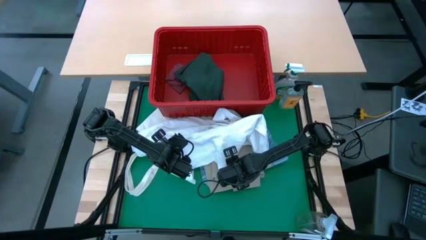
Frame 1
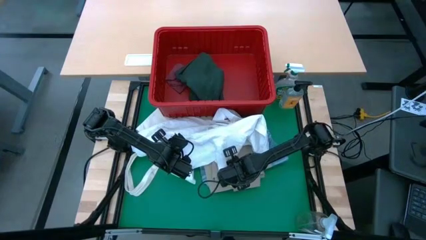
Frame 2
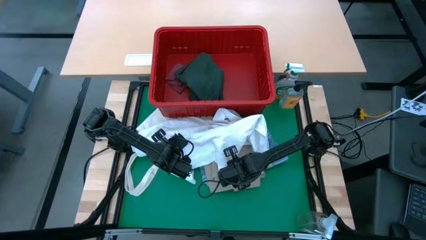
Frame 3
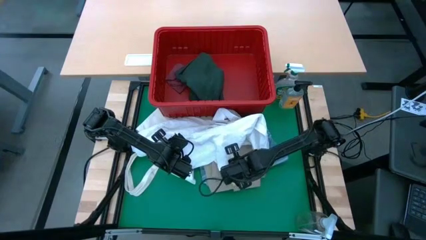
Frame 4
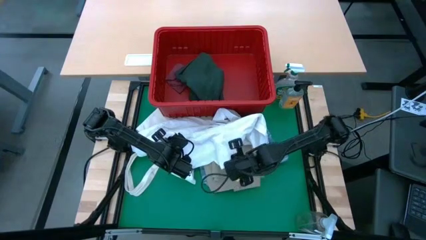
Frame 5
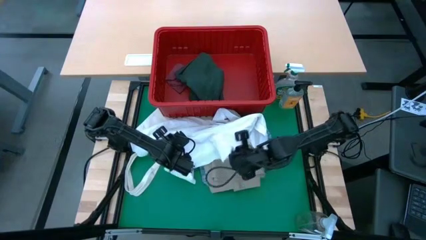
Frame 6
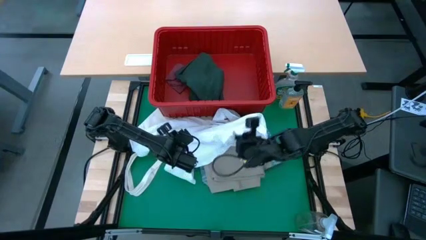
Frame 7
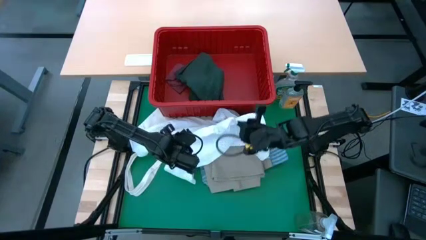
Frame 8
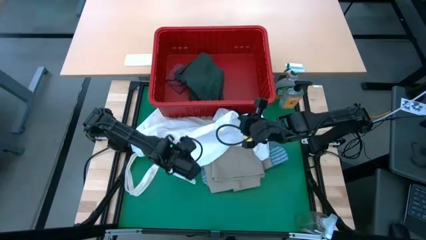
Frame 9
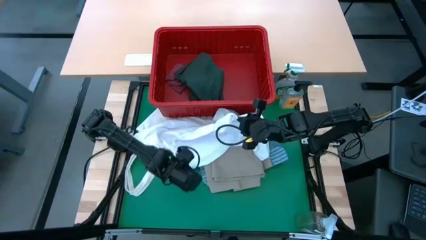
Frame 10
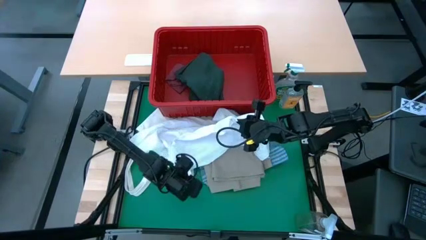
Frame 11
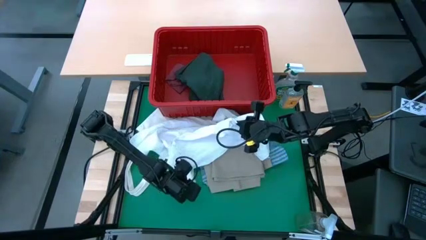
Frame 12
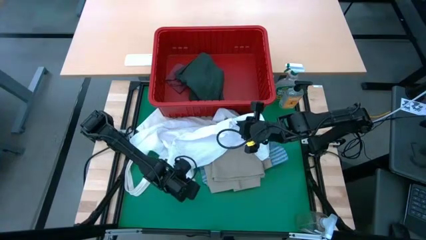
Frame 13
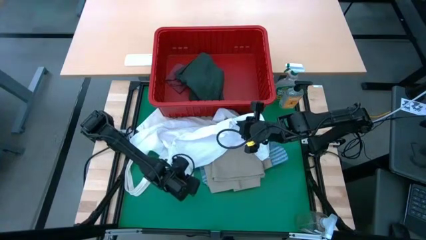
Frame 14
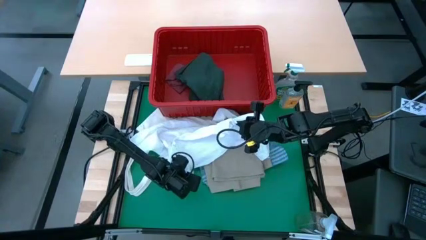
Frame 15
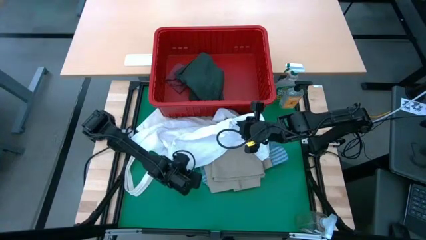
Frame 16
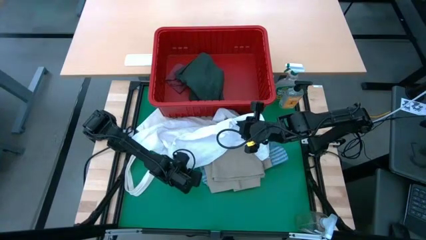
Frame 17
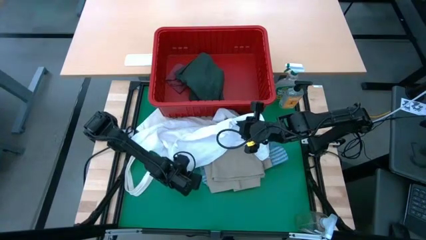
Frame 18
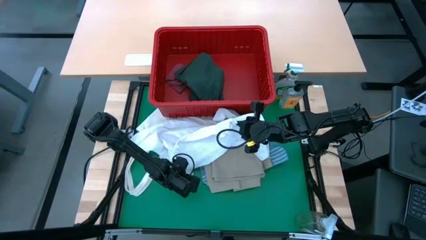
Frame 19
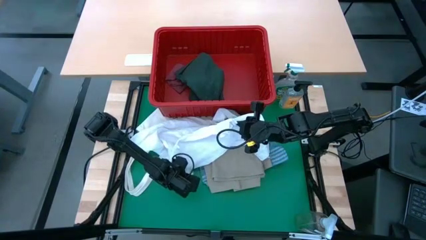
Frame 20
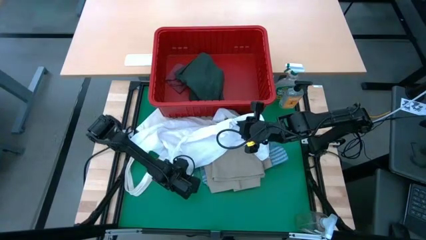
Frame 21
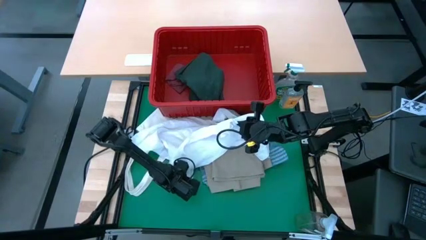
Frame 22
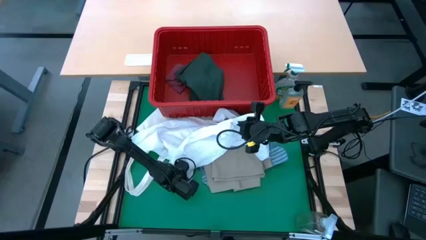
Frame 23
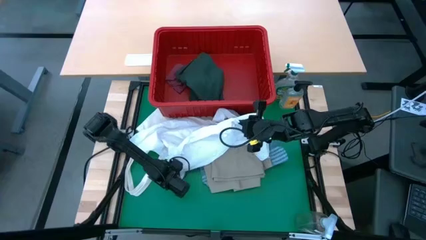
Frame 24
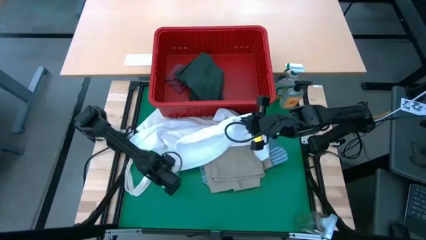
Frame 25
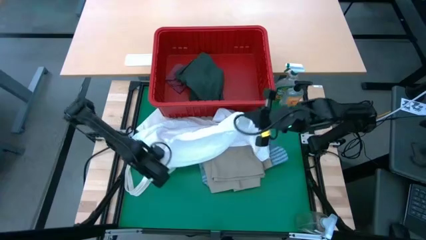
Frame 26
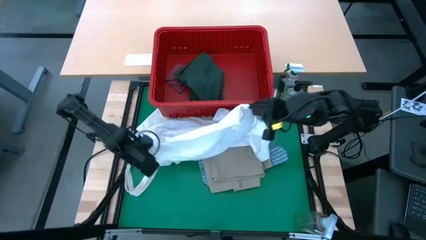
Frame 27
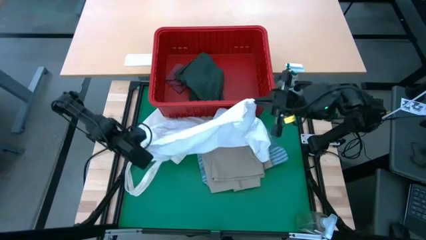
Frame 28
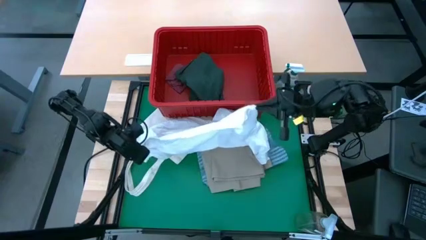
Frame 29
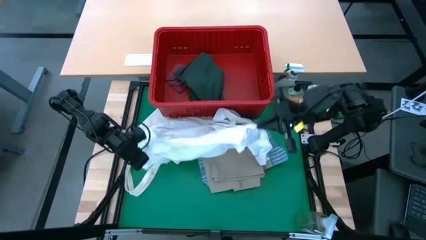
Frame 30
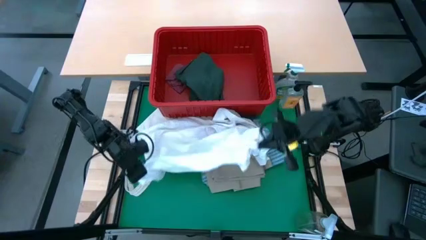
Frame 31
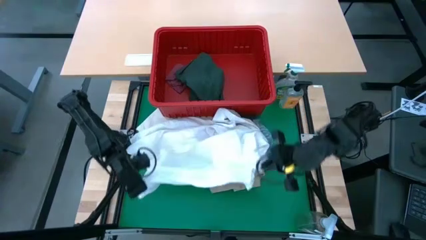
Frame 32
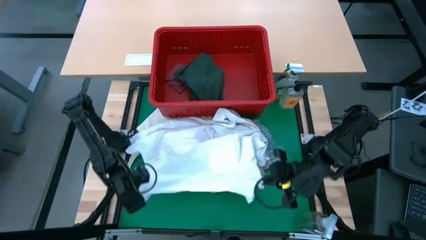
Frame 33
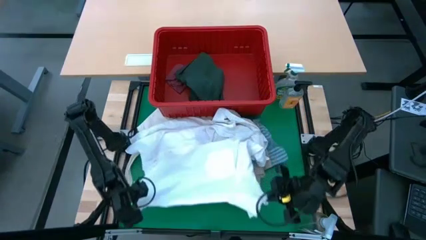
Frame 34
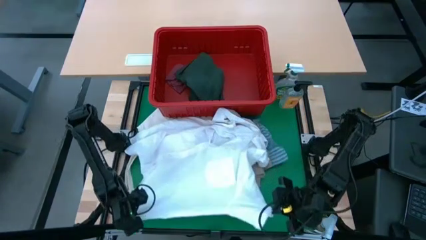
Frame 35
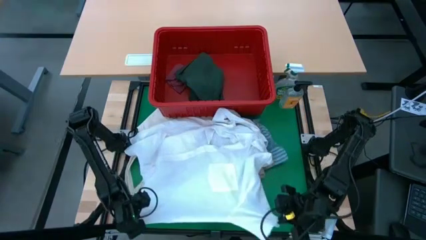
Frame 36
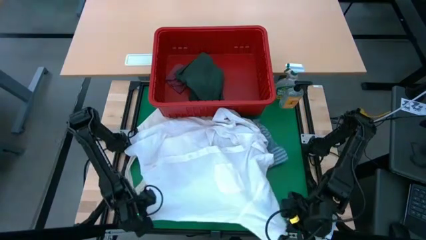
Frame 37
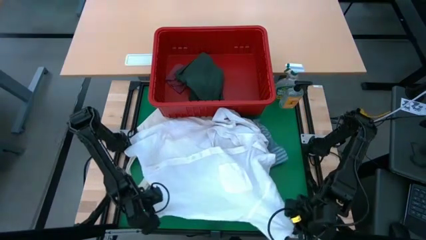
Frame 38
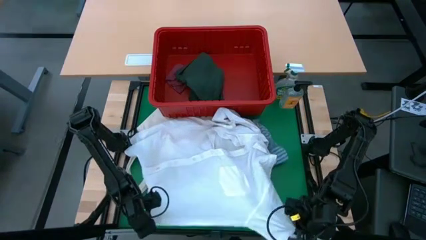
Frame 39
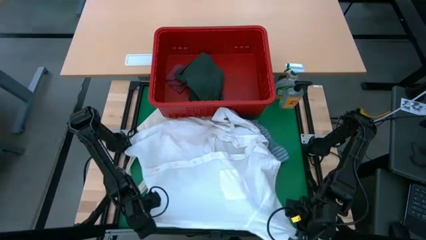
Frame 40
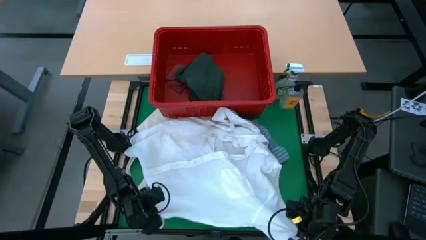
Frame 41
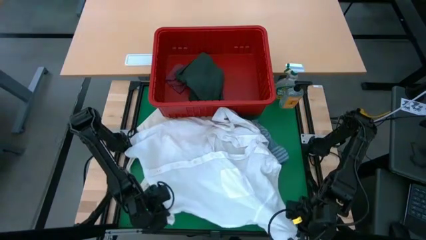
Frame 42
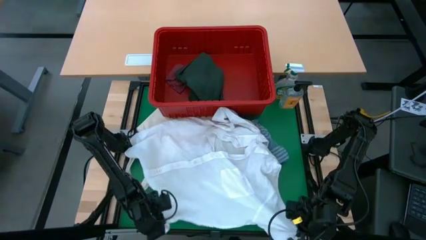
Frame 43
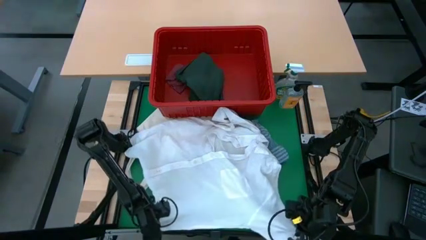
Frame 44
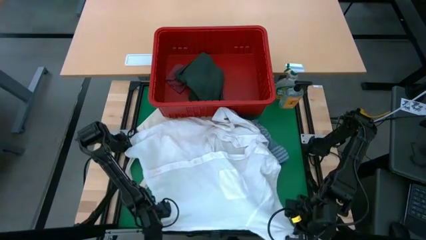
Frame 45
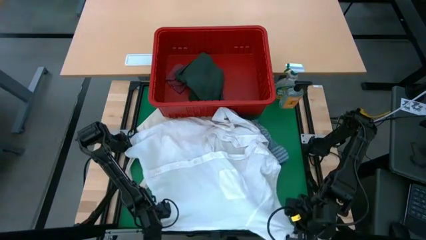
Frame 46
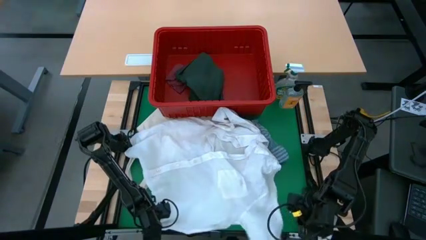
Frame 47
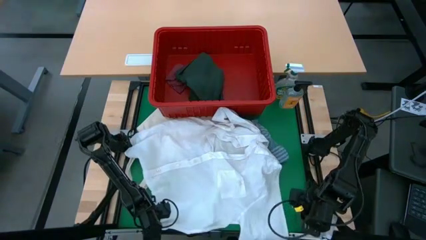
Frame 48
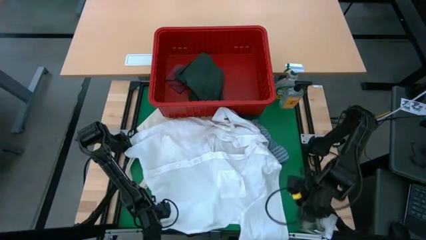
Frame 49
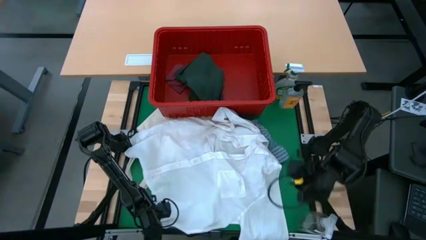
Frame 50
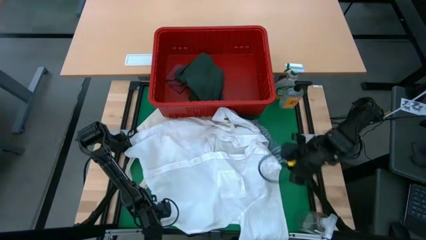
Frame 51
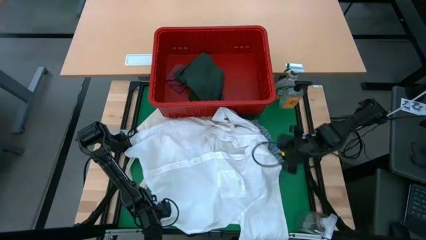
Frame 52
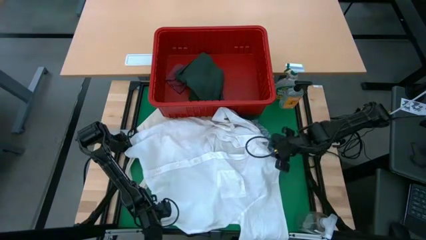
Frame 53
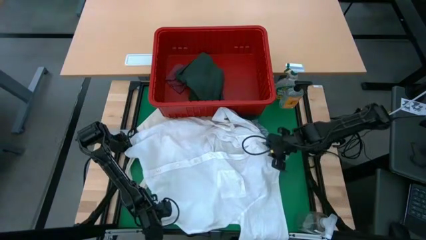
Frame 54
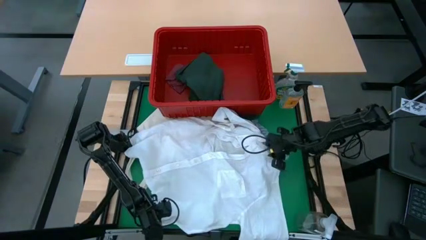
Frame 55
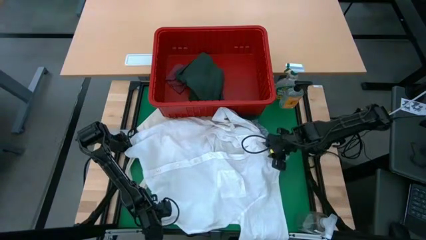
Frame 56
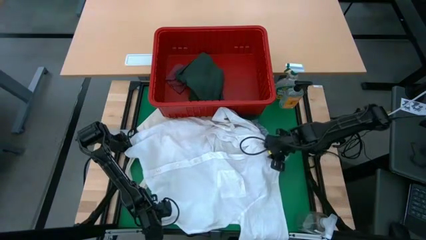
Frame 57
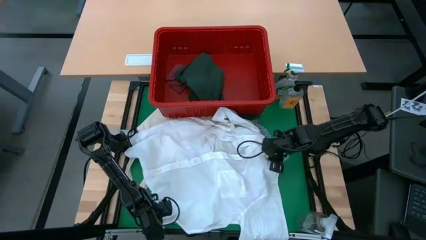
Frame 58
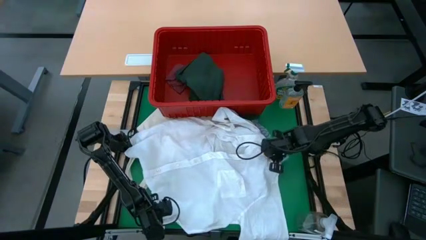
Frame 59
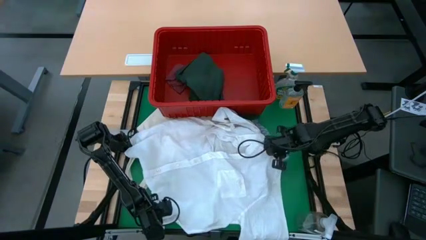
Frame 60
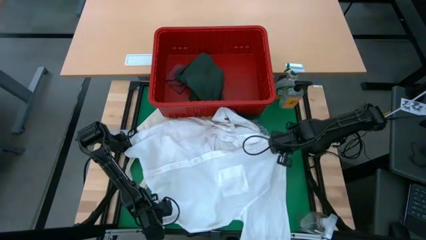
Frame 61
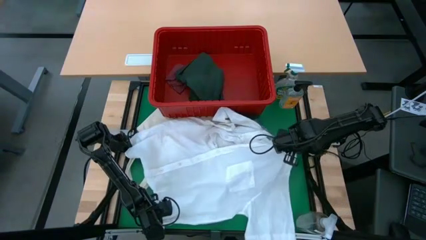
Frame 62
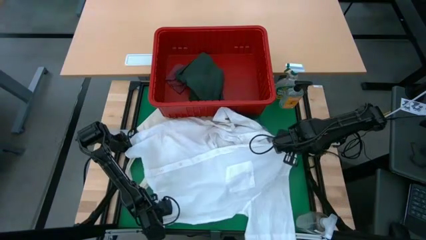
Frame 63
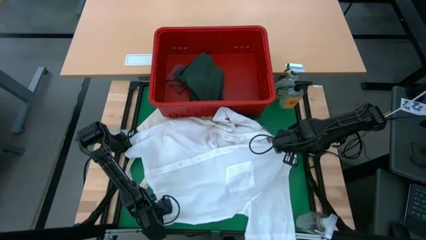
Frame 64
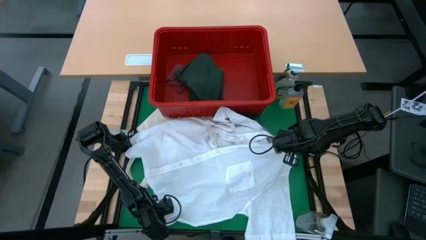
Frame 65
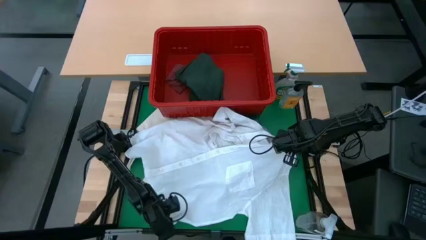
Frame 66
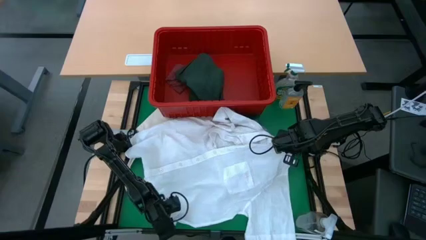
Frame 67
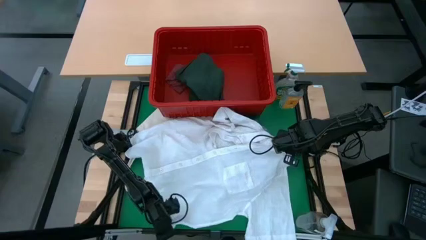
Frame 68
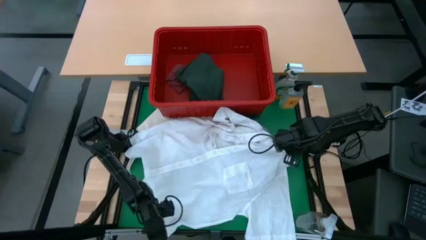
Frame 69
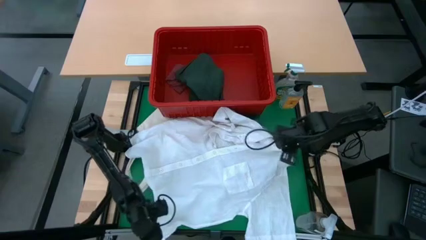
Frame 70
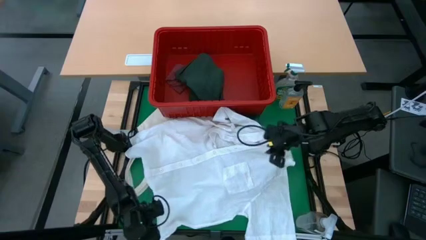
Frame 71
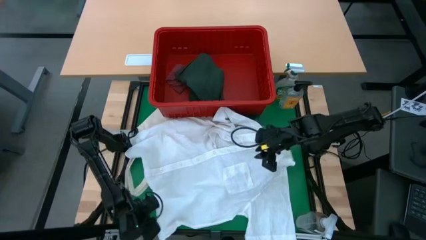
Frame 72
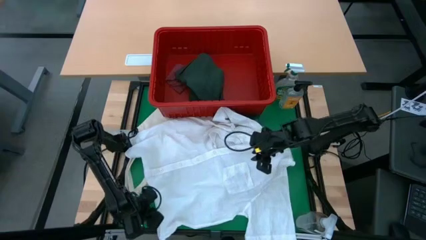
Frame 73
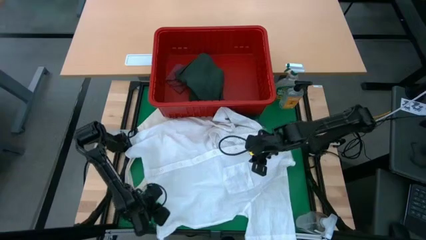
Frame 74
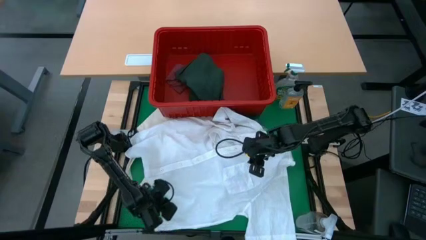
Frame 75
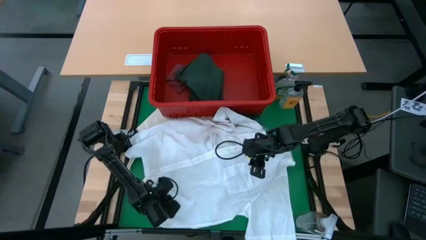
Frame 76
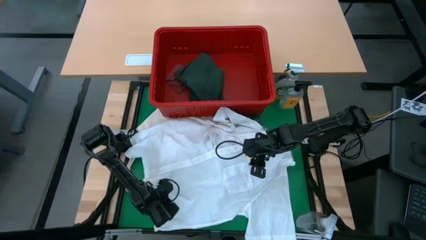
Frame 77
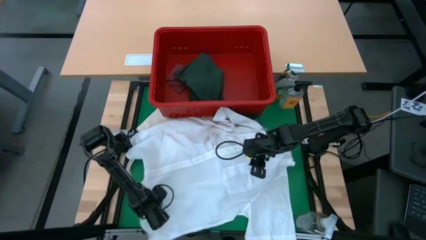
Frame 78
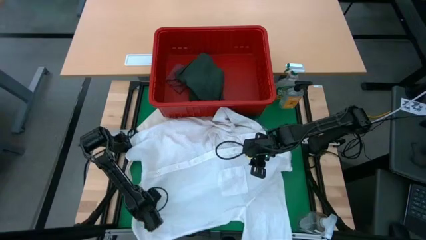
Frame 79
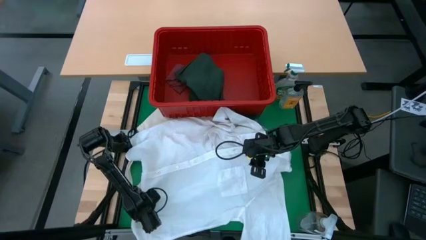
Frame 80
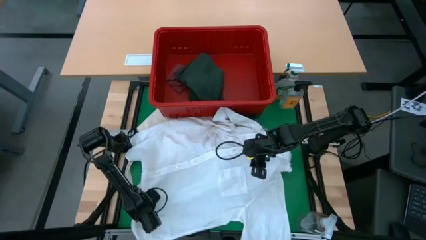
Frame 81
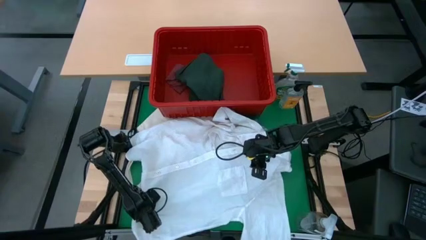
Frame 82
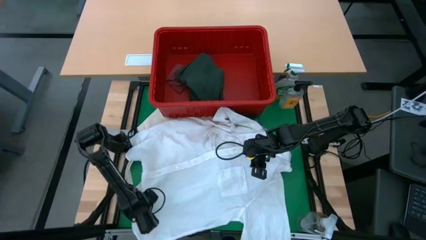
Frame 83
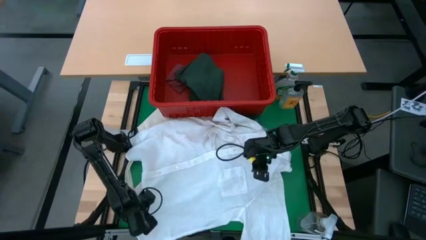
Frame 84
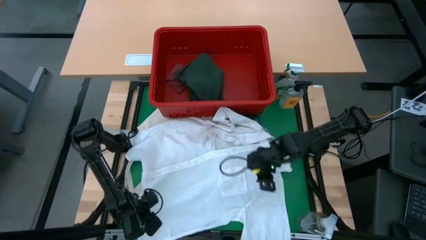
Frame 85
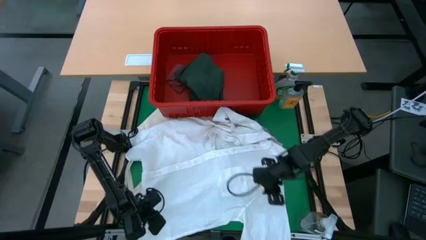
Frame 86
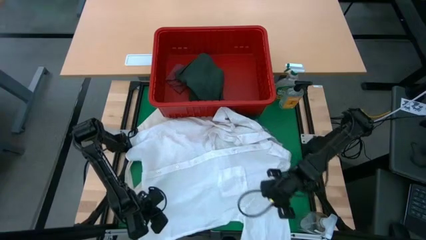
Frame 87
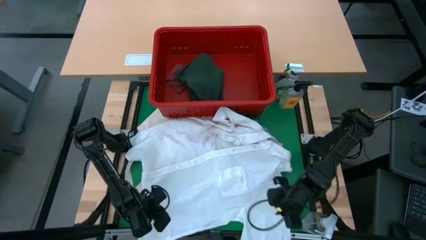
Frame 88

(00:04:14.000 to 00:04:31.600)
Task: Fold Laundry from Bin
Fold the white polo shirt
